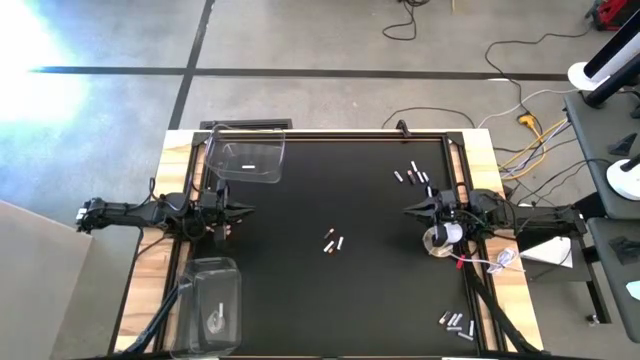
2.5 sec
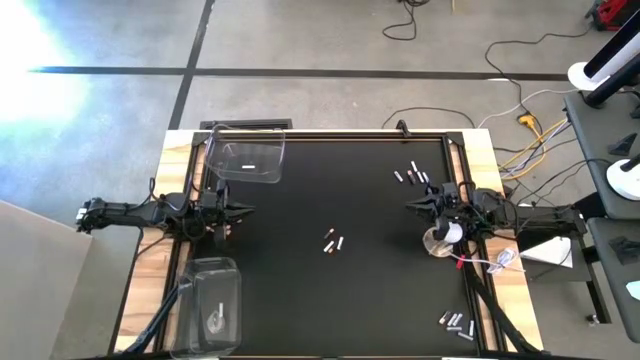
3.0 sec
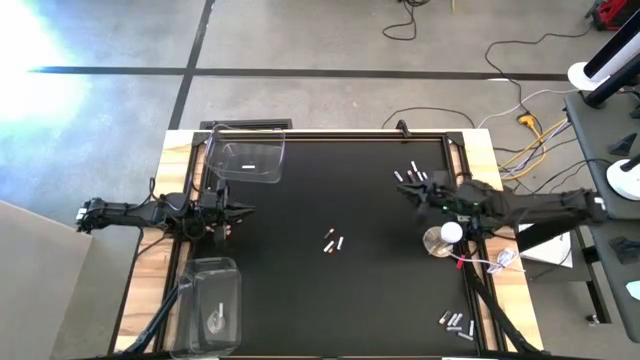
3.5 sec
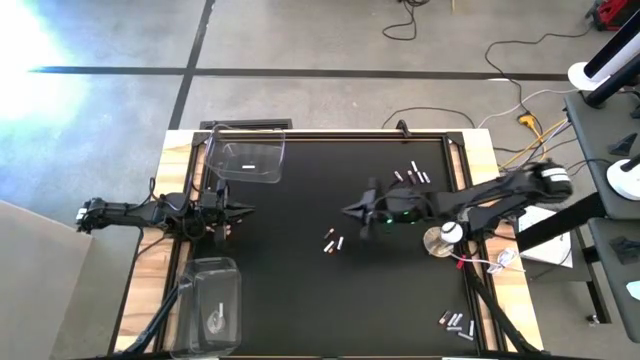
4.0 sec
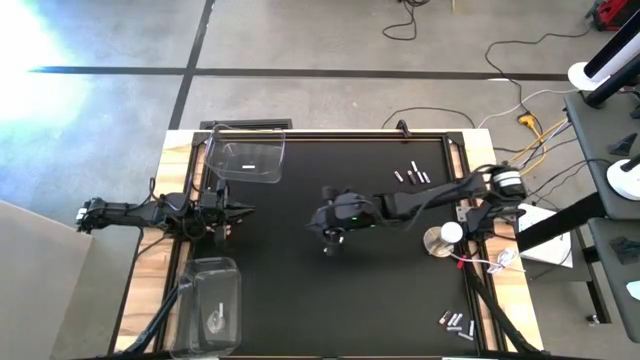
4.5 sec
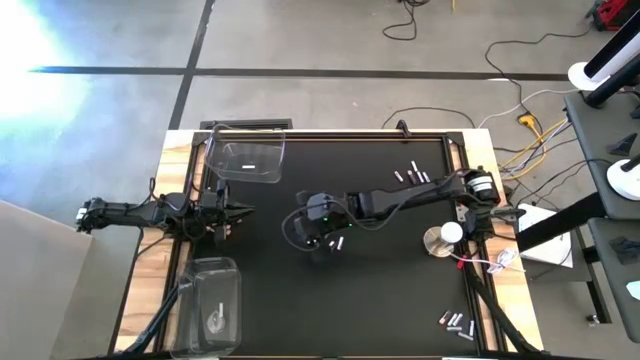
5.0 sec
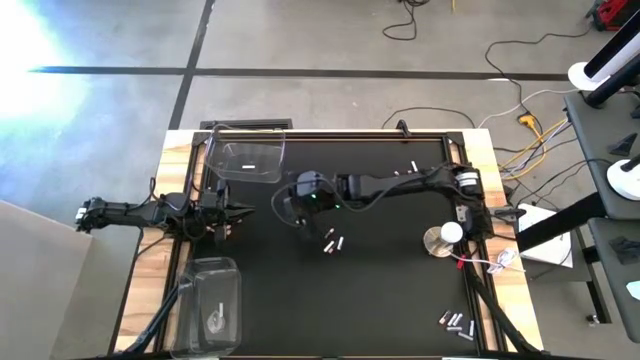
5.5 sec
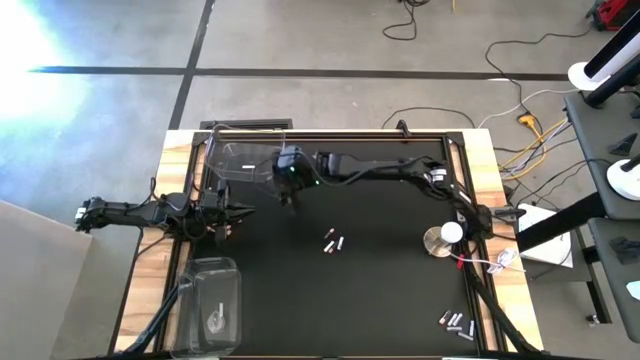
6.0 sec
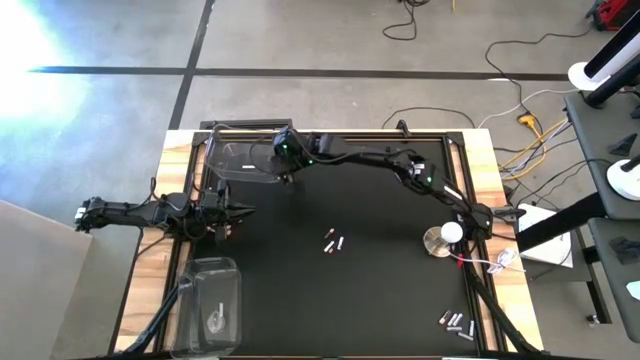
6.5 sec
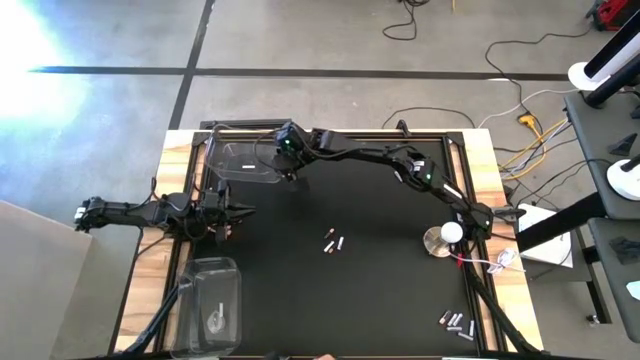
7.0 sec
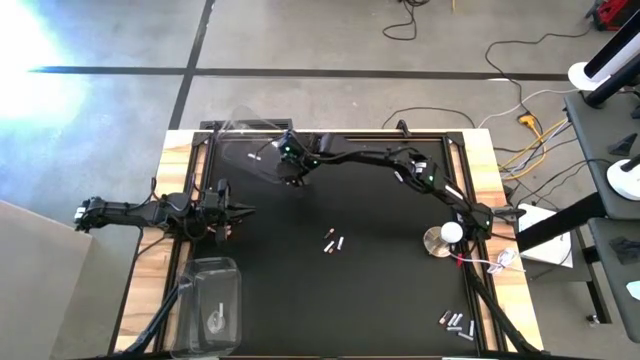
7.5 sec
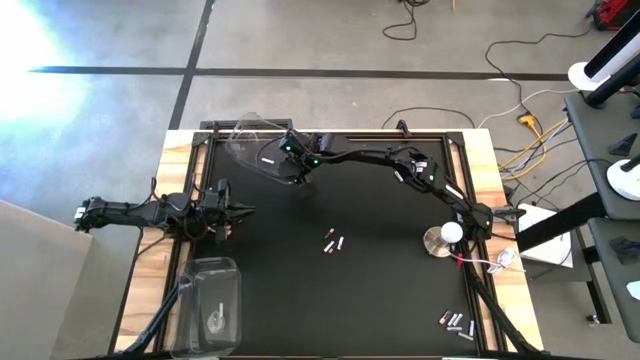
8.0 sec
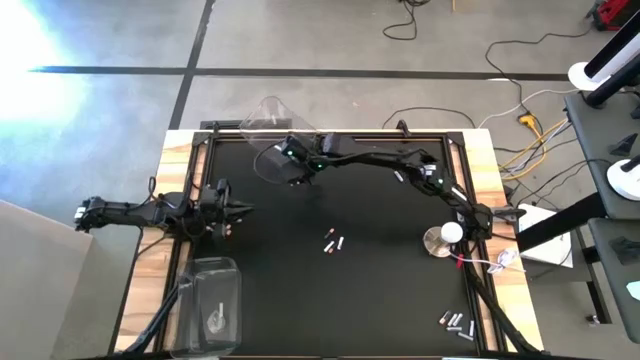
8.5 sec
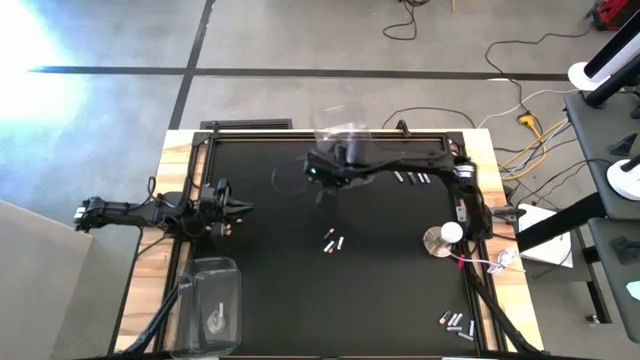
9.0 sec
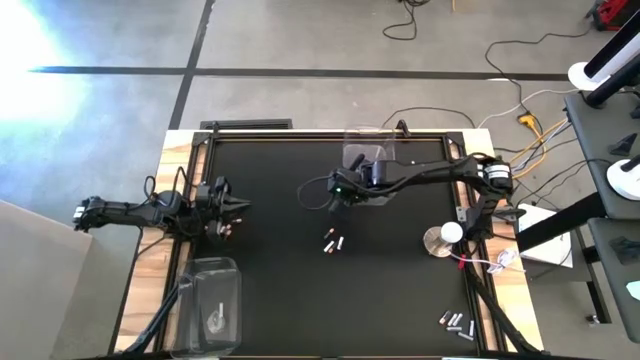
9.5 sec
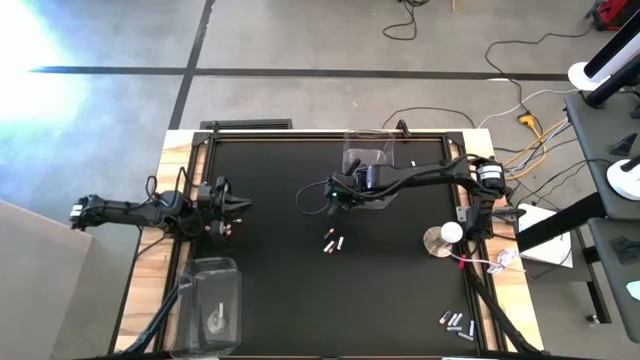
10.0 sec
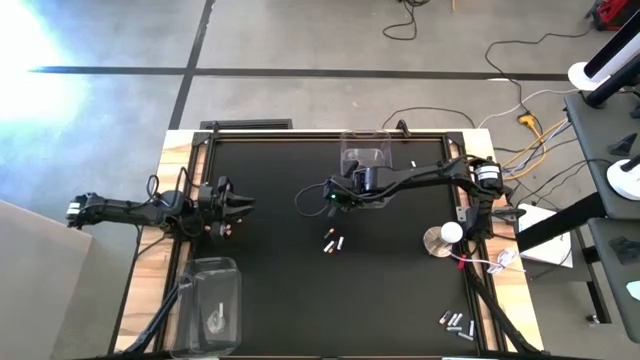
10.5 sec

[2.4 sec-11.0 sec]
Task: Sort batteries
Move the top transparent bin to the top center of the table

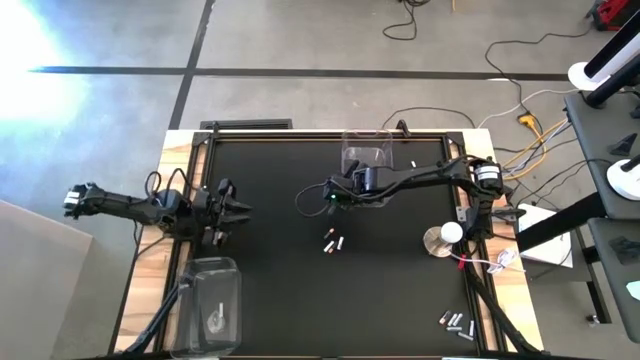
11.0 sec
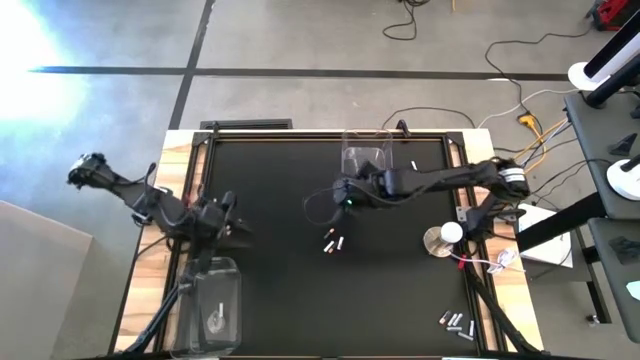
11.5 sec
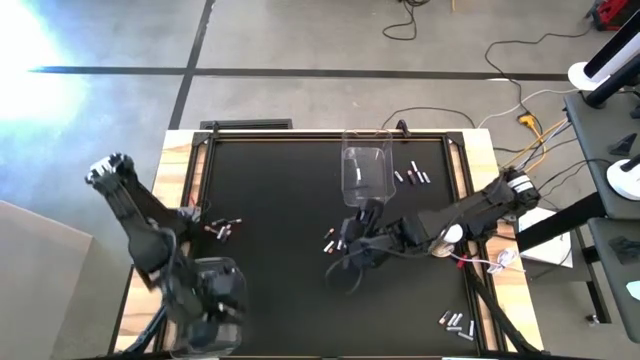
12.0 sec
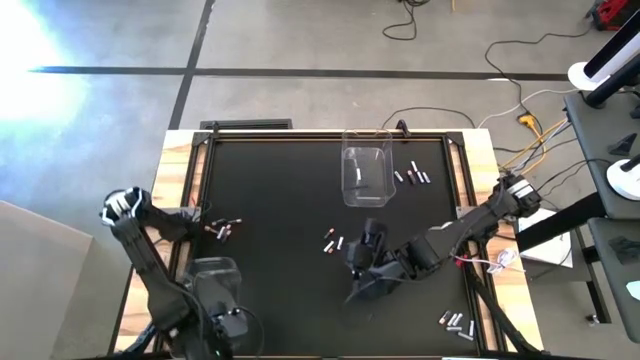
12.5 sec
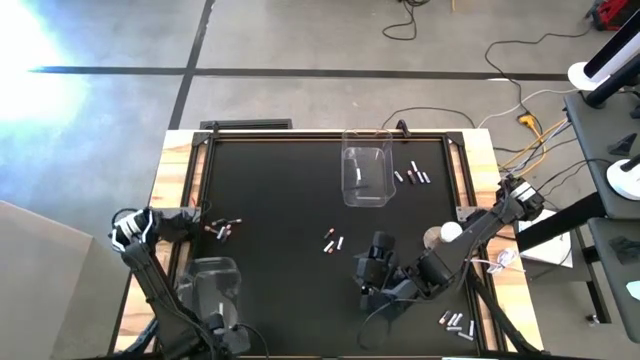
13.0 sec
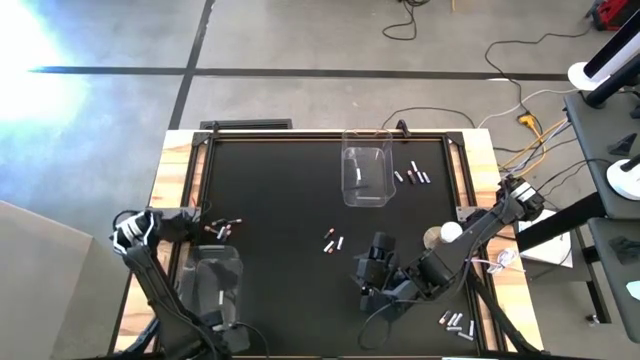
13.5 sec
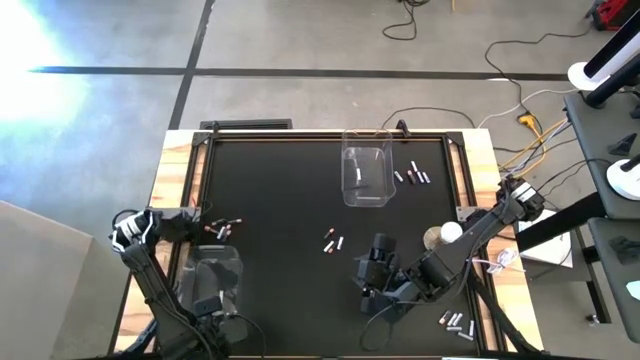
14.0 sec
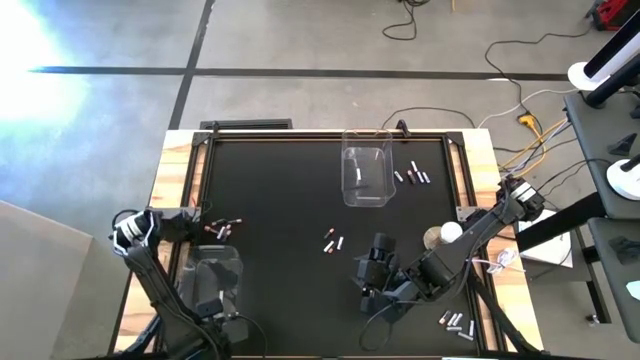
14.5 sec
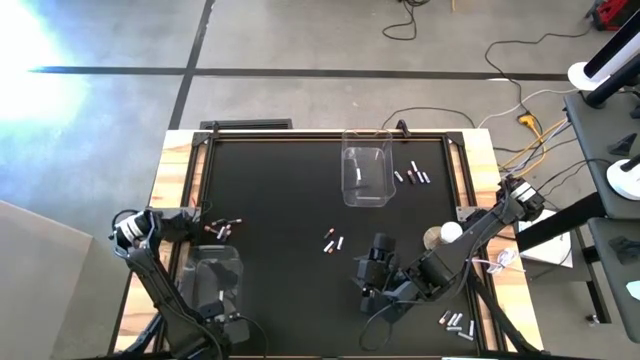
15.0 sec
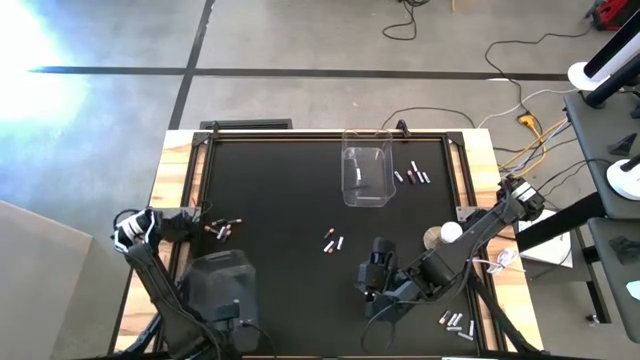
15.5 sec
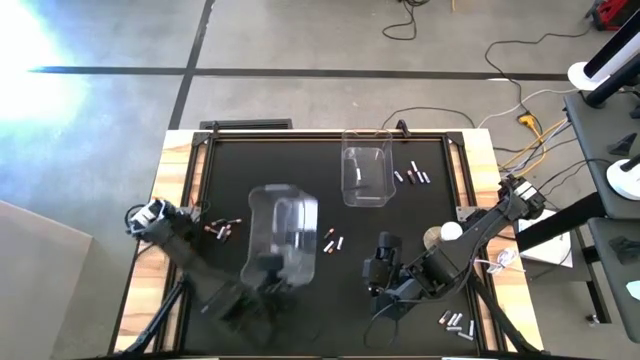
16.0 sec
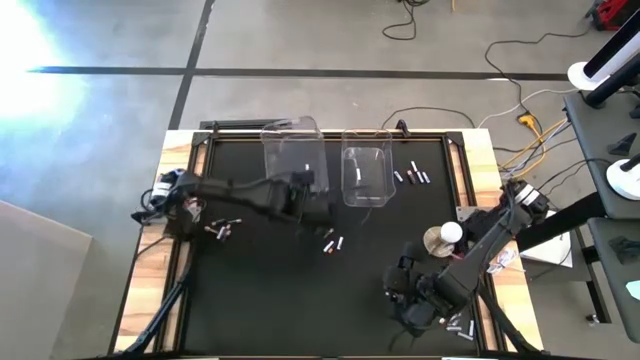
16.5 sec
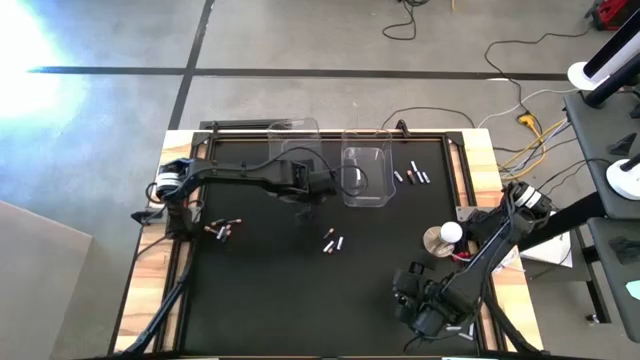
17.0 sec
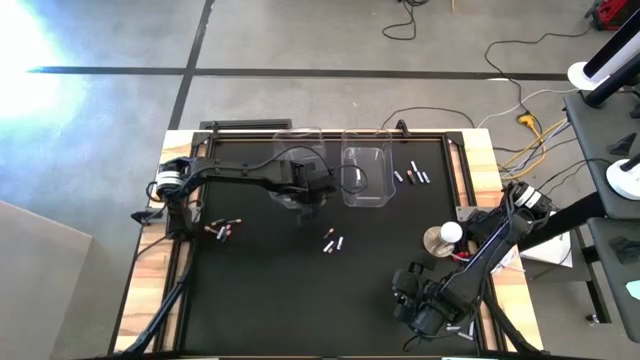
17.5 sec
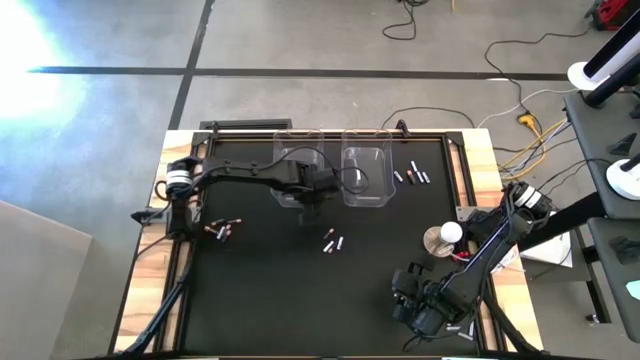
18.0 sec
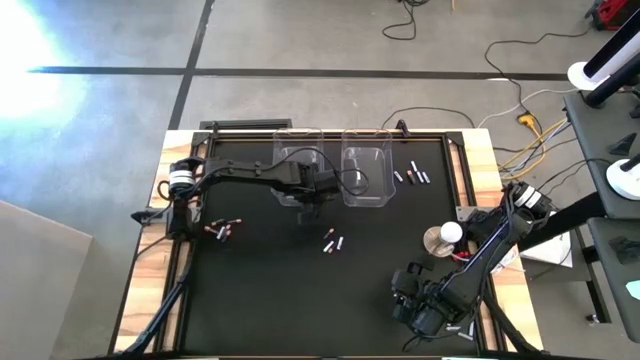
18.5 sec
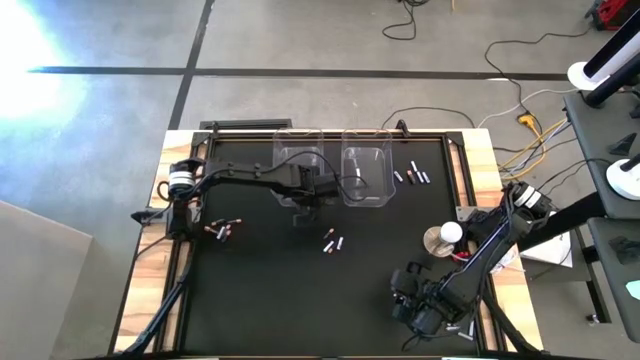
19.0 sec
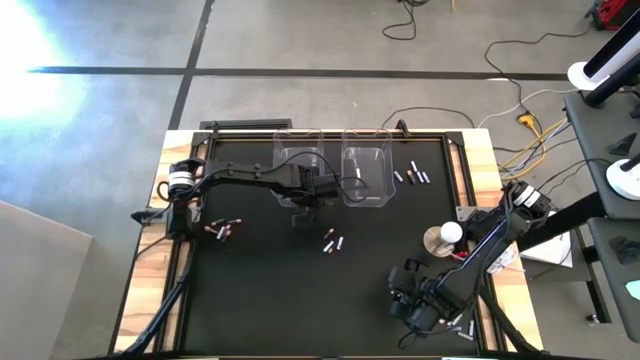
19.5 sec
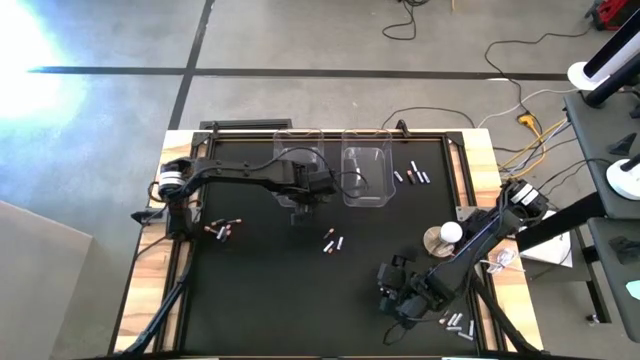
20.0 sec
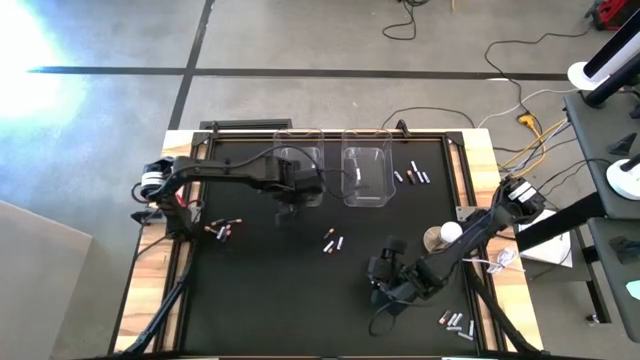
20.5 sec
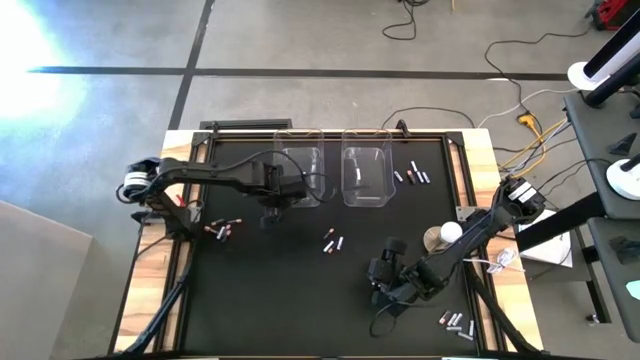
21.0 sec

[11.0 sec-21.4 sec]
Move the bottom transparent bin to the top center of the table
